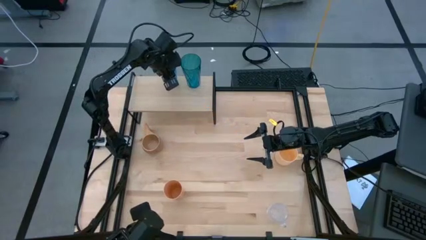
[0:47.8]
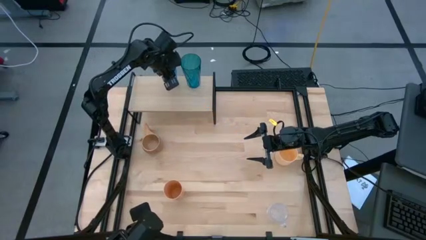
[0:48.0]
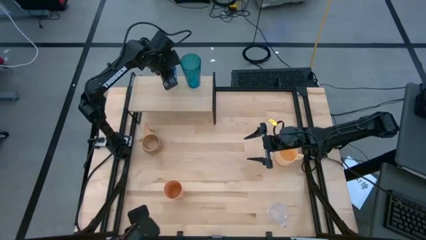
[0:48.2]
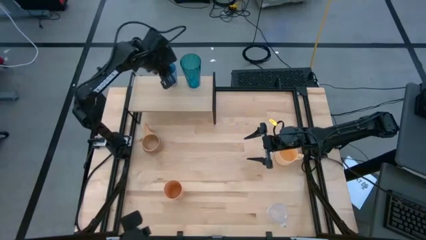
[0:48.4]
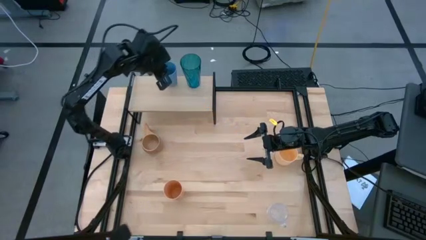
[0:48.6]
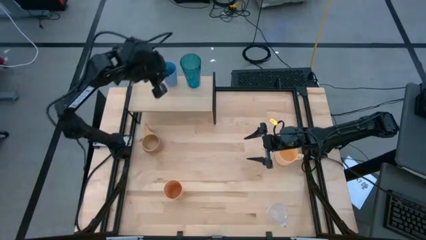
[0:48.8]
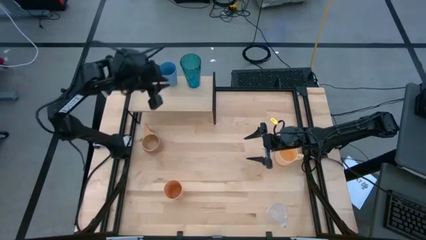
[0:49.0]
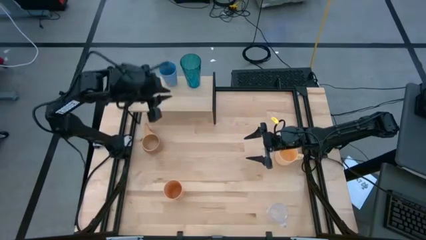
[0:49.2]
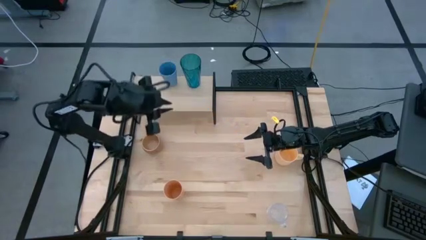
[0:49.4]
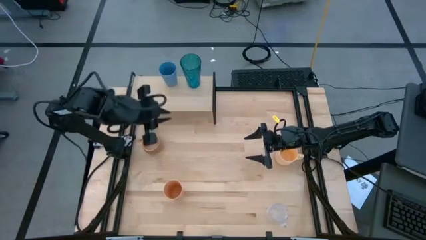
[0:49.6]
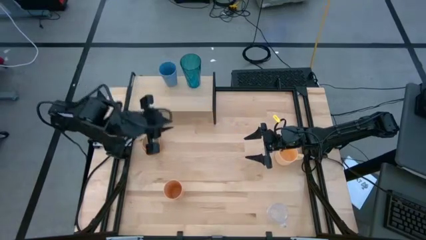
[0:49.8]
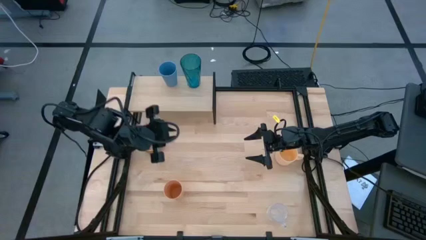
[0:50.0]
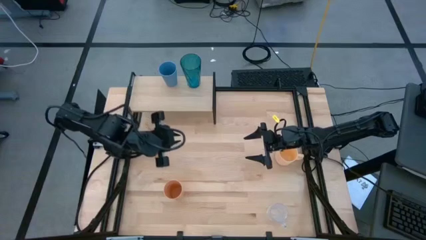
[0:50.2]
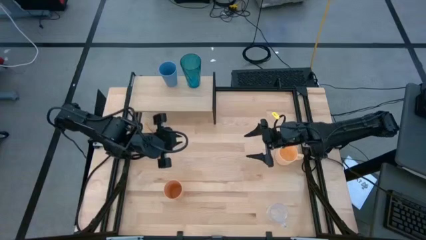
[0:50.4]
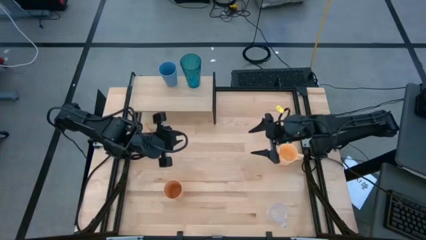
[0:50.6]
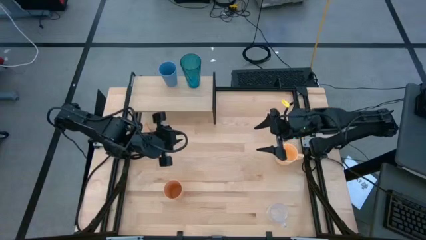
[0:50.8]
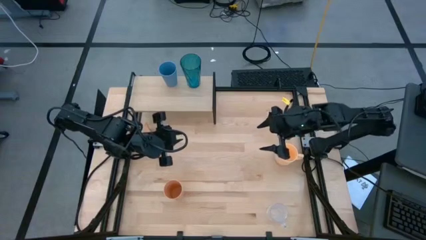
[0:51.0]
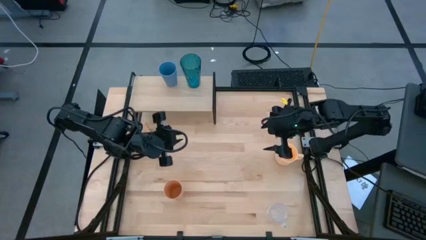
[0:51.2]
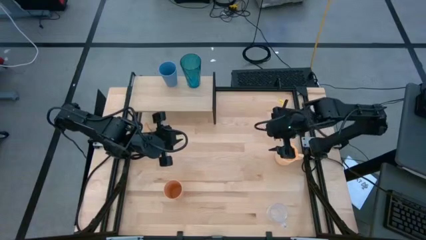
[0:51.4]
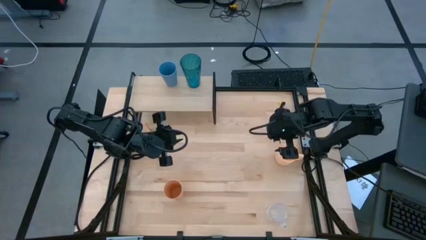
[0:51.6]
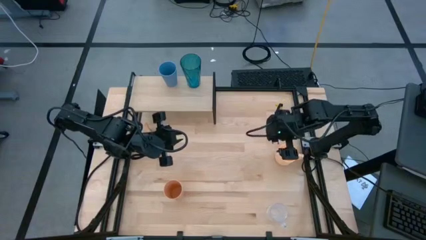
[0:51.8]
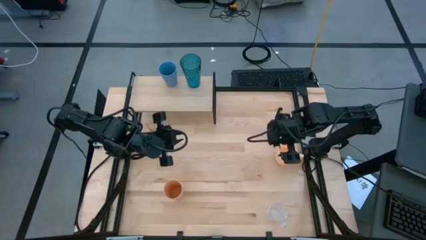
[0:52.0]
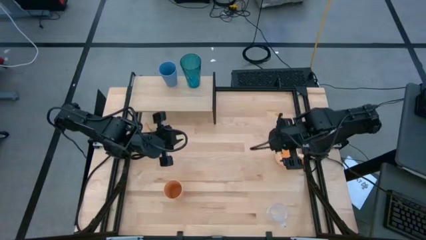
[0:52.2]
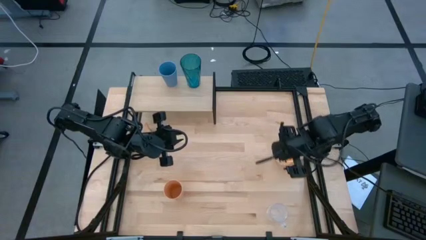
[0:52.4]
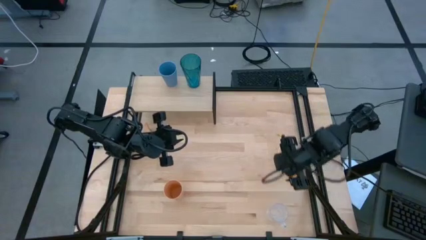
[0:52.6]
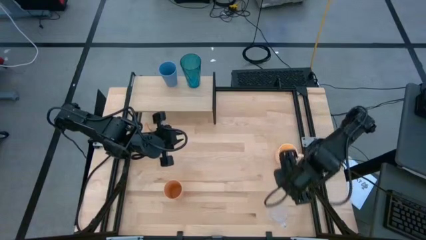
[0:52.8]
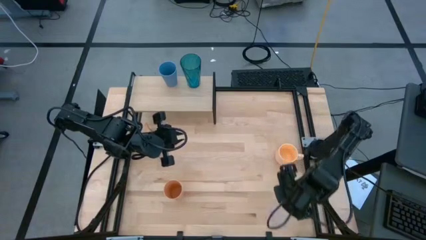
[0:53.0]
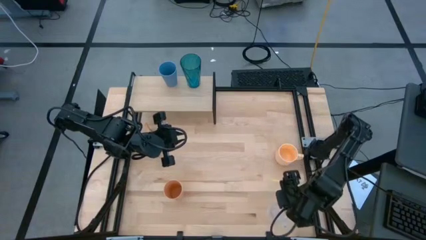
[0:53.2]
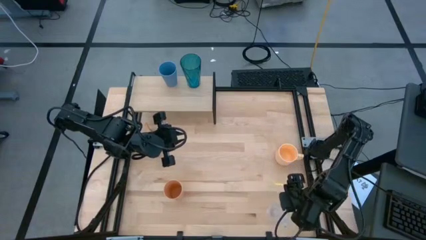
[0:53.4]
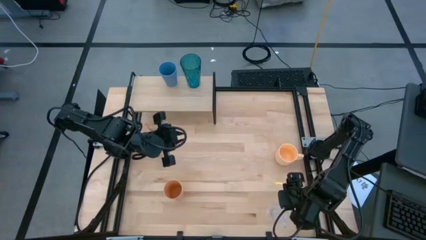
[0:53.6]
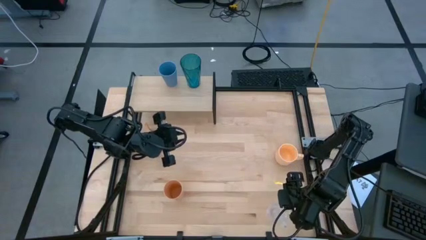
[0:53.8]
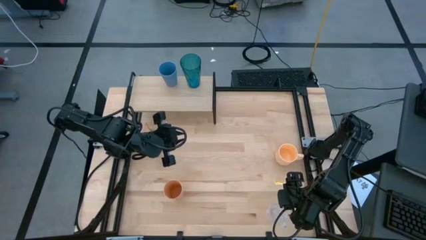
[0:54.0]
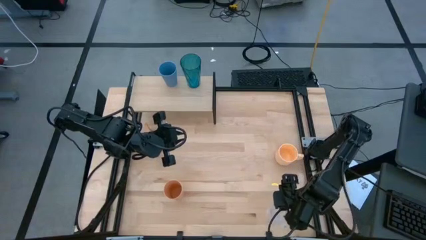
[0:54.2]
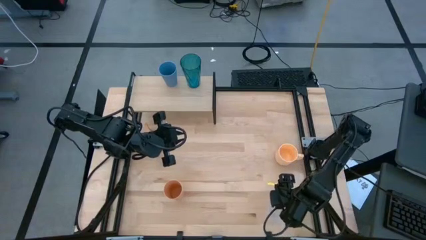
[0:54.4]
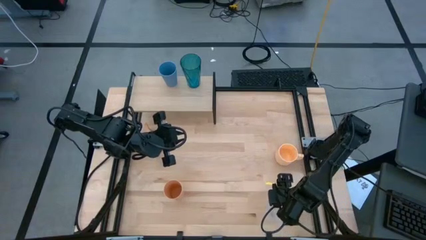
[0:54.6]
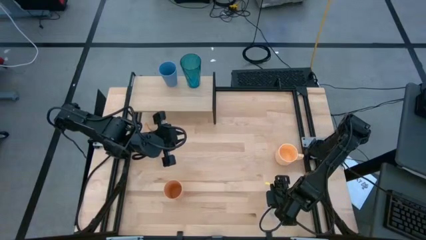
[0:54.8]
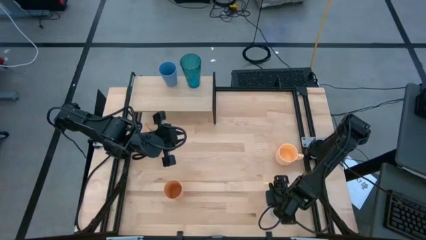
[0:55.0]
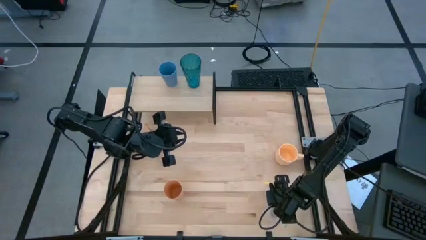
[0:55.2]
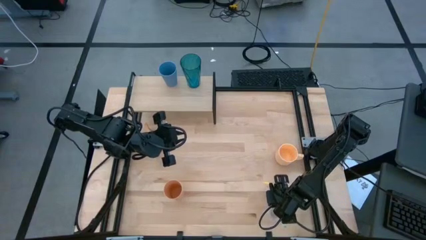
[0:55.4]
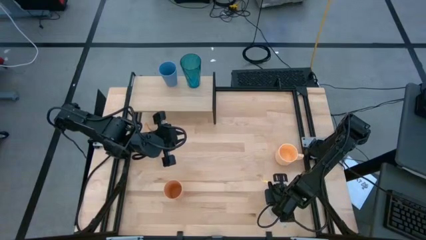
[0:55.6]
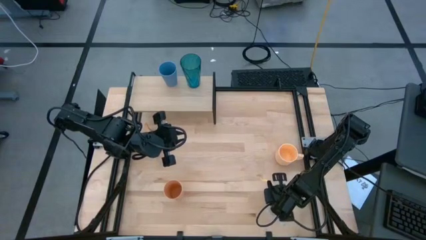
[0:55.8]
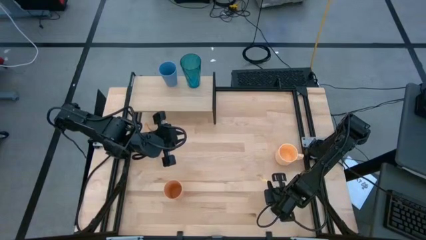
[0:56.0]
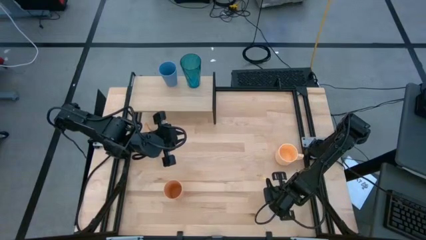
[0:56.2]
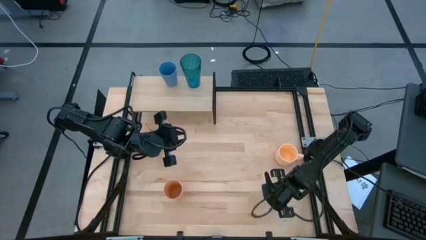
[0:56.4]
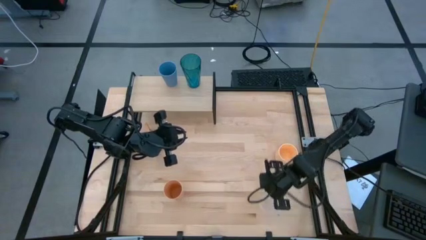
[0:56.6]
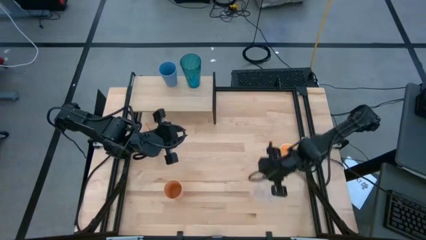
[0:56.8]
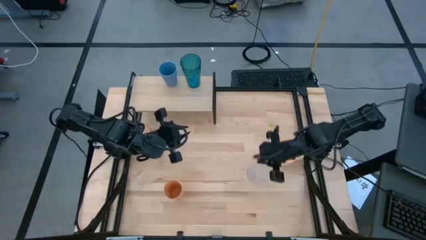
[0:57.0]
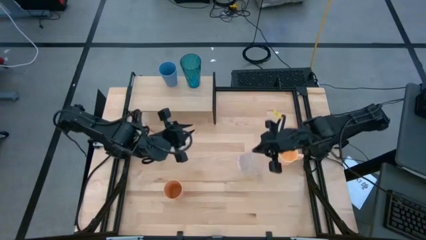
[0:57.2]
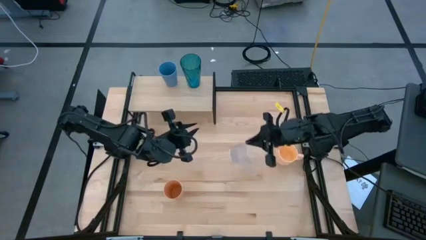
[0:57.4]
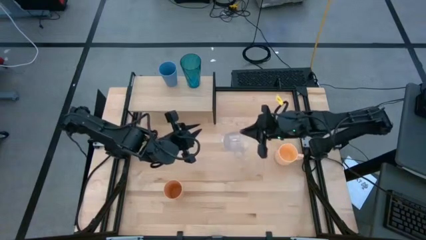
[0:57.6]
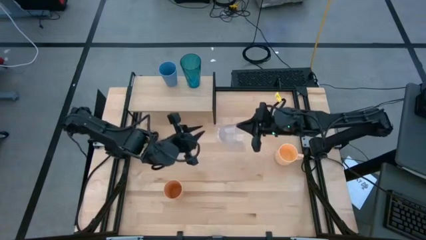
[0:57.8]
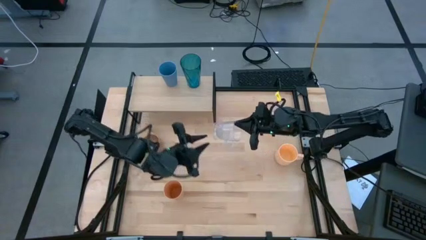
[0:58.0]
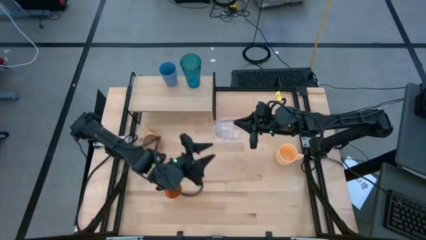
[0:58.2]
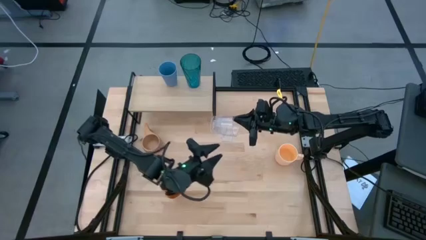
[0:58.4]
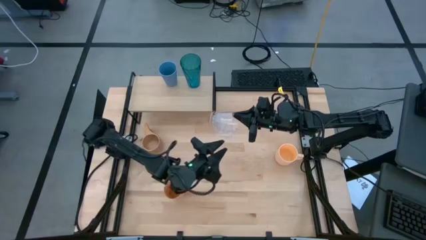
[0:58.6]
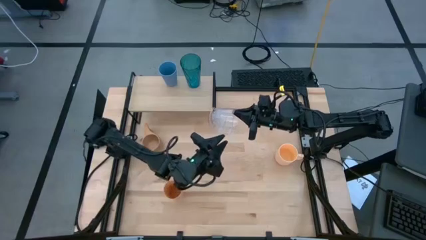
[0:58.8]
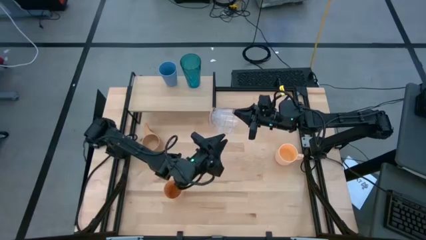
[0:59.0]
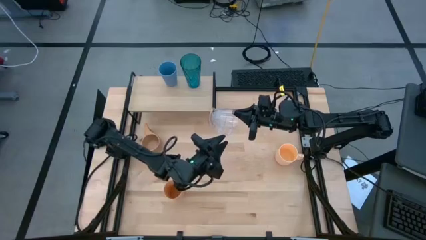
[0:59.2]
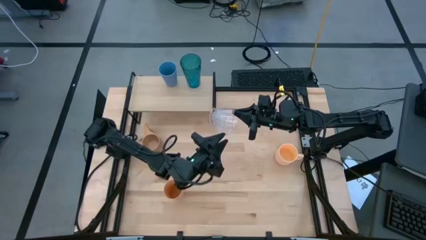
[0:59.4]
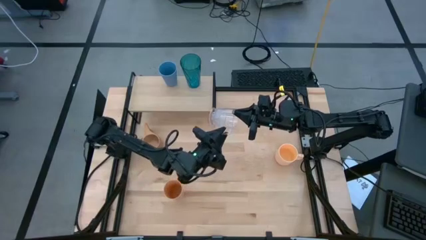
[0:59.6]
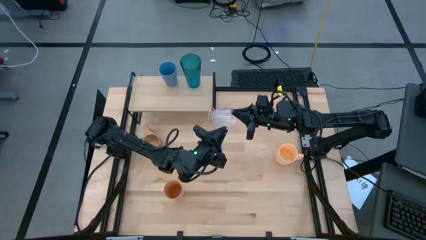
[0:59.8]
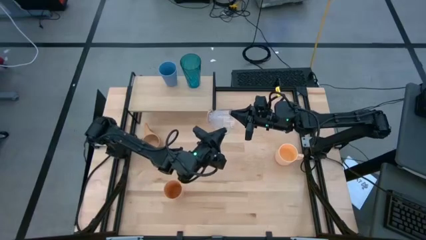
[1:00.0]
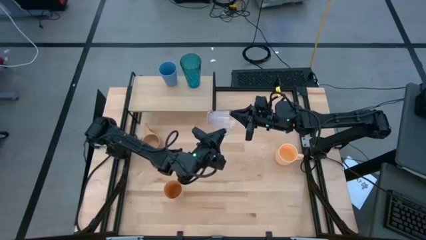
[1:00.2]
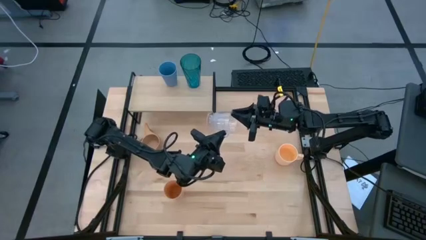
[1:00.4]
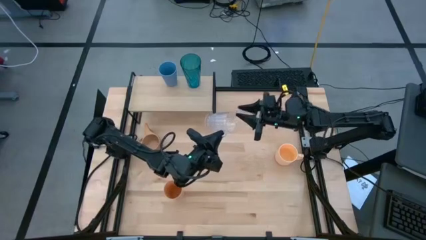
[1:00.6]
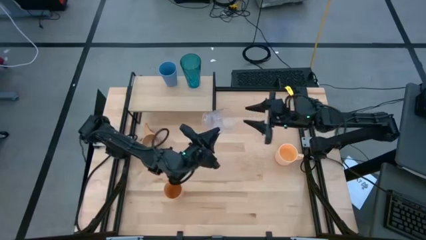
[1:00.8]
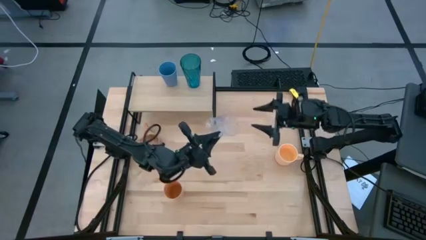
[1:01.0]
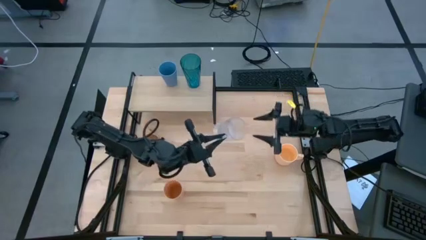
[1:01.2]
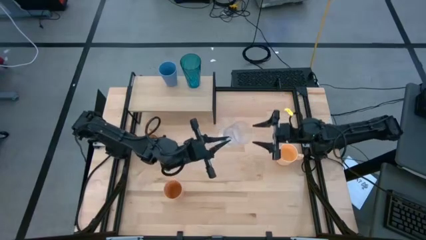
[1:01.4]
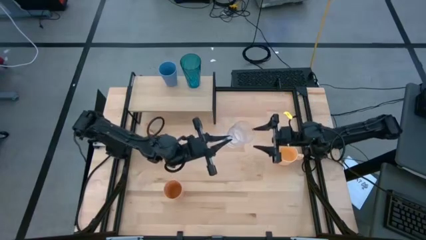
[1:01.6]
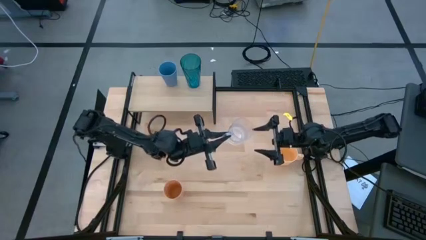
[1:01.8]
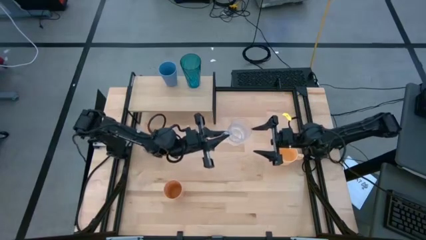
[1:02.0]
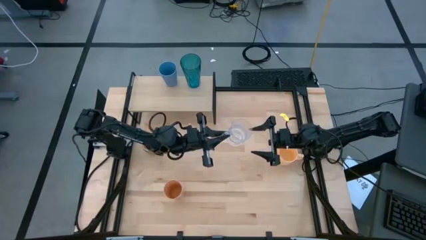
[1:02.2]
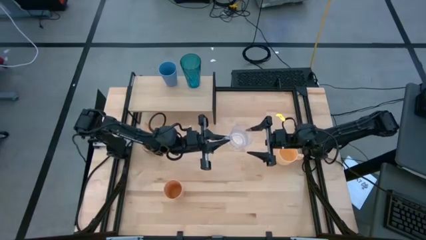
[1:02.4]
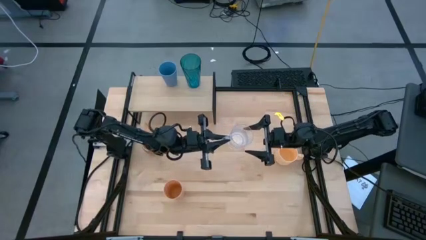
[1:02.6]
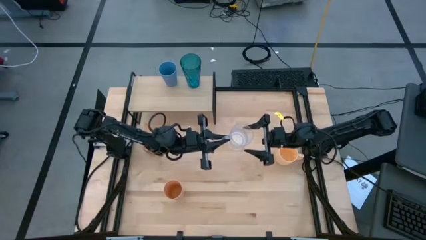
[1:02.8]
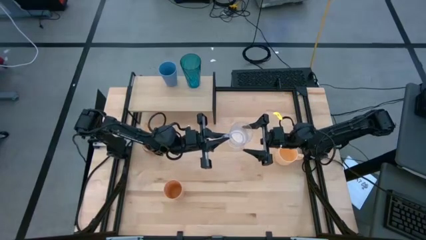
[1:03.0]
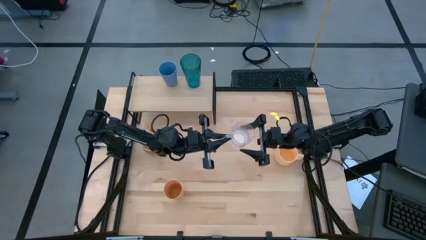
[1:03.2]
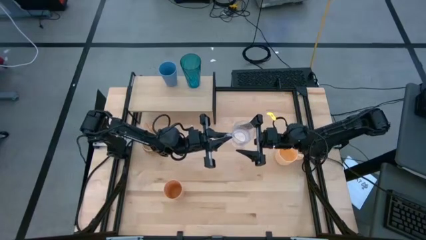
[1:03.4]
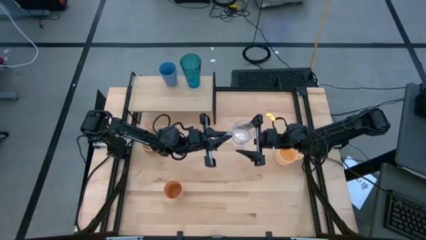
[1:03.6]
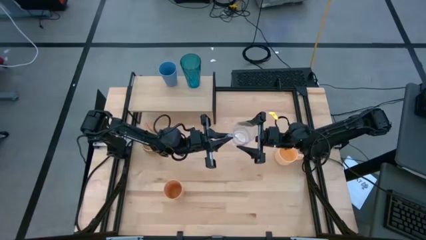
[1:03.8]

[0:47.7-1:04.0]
Task: Stack small to large cups/mugs on shelf
Put the transparent mug on the shelf
